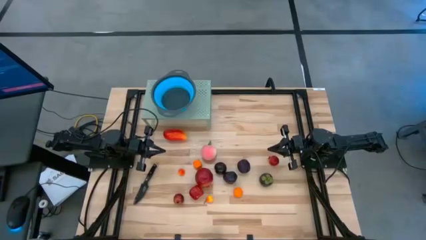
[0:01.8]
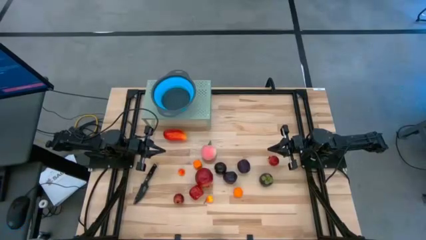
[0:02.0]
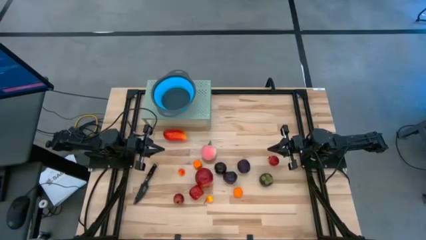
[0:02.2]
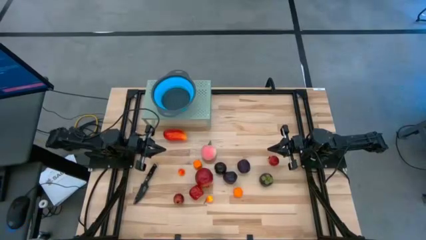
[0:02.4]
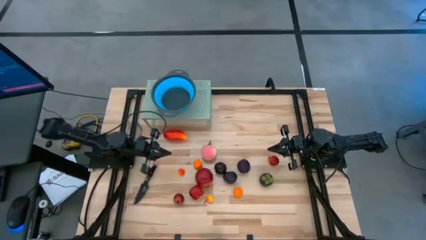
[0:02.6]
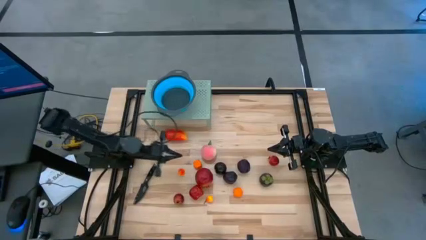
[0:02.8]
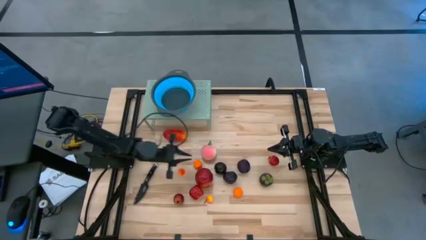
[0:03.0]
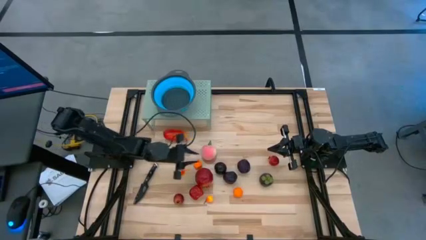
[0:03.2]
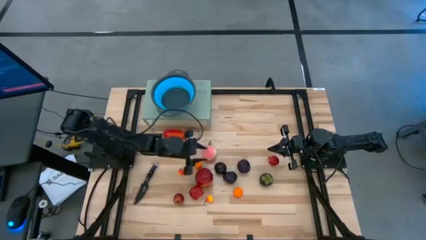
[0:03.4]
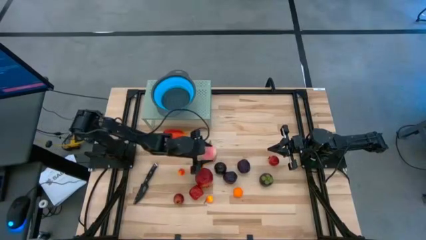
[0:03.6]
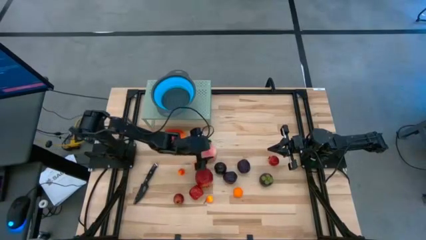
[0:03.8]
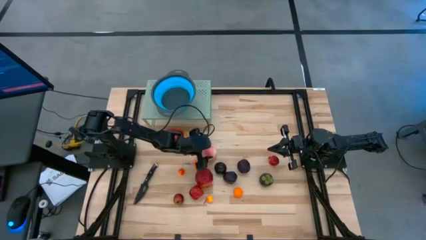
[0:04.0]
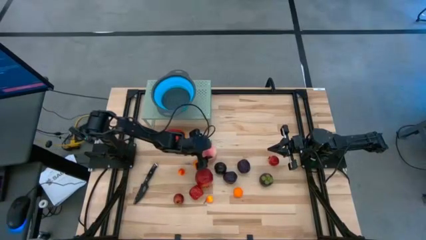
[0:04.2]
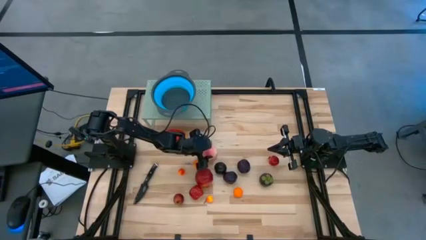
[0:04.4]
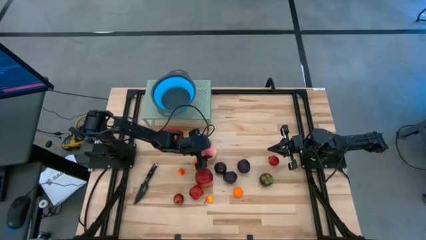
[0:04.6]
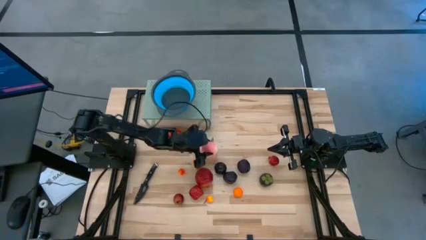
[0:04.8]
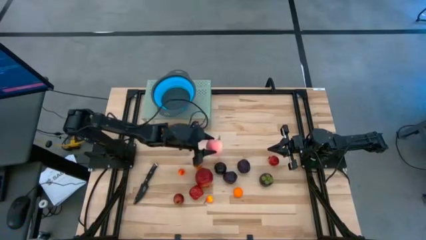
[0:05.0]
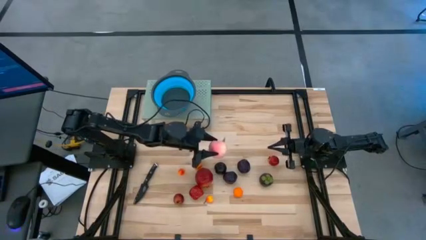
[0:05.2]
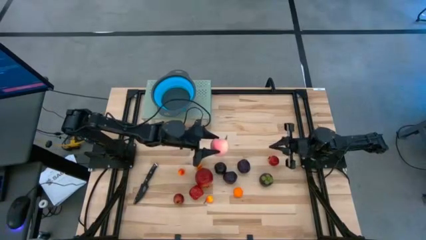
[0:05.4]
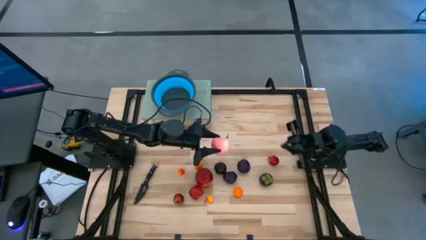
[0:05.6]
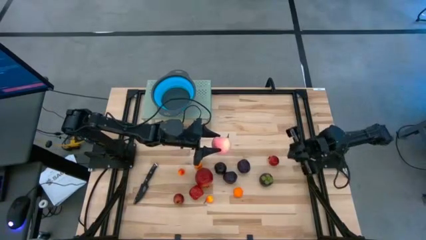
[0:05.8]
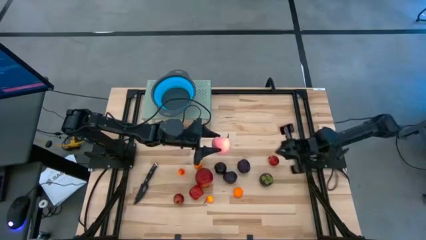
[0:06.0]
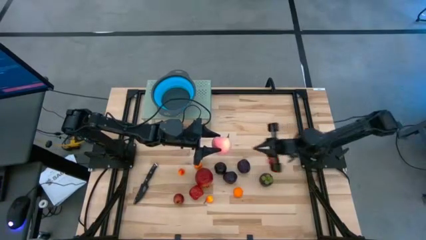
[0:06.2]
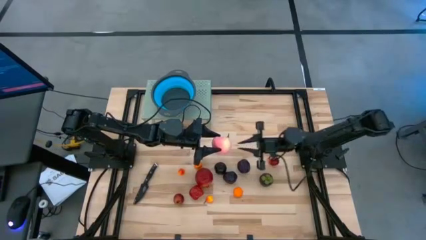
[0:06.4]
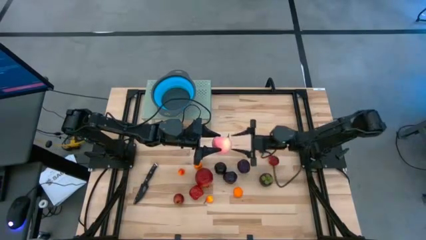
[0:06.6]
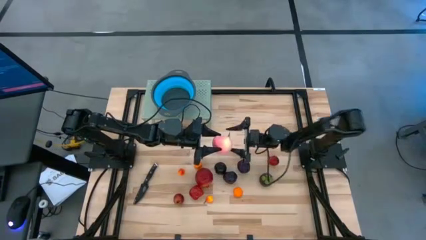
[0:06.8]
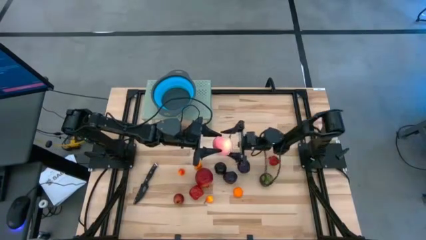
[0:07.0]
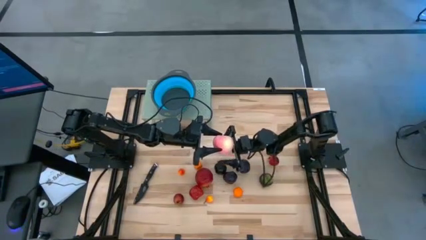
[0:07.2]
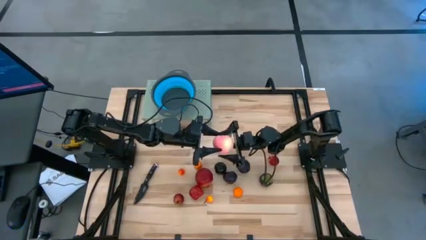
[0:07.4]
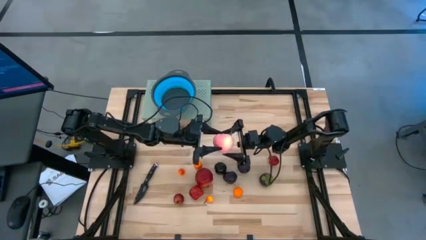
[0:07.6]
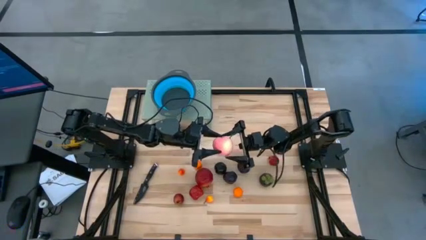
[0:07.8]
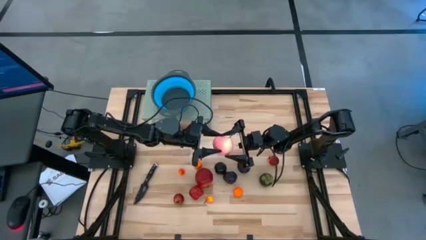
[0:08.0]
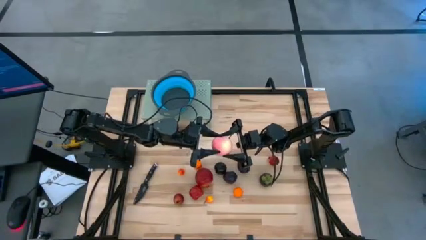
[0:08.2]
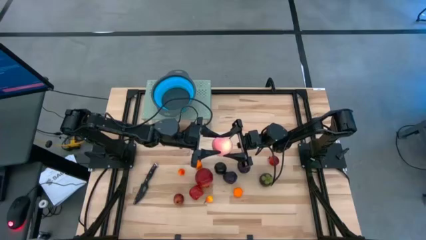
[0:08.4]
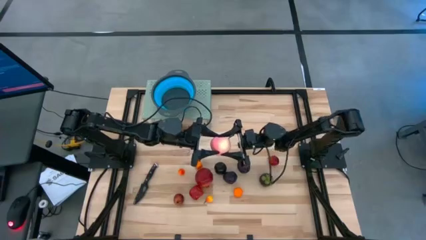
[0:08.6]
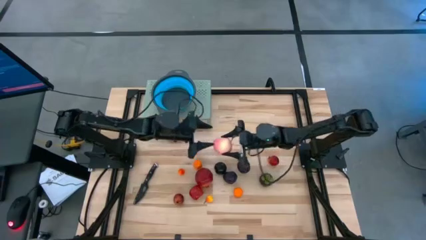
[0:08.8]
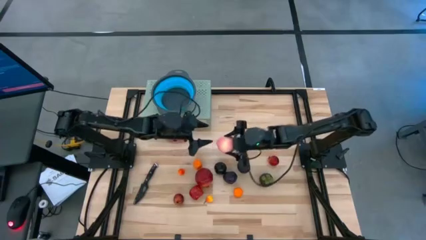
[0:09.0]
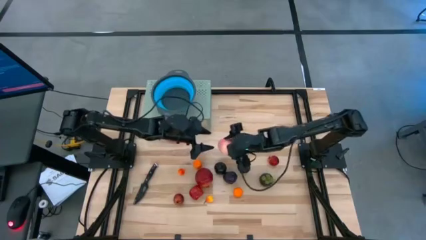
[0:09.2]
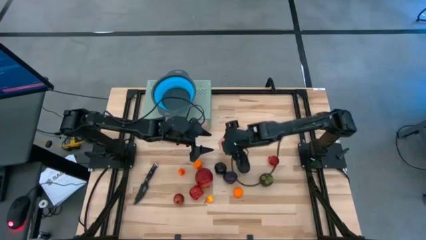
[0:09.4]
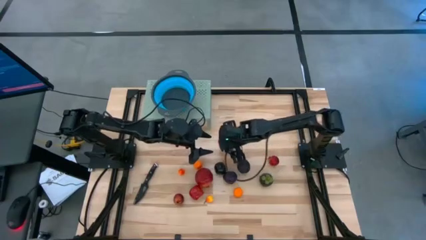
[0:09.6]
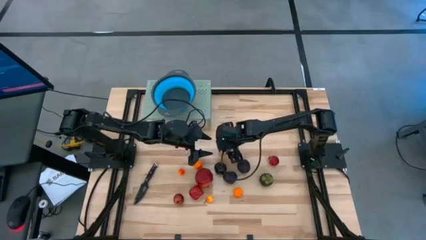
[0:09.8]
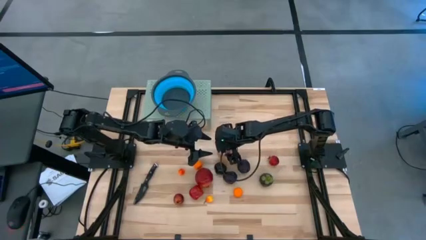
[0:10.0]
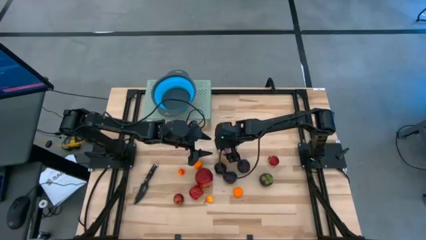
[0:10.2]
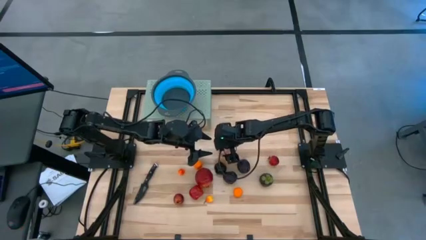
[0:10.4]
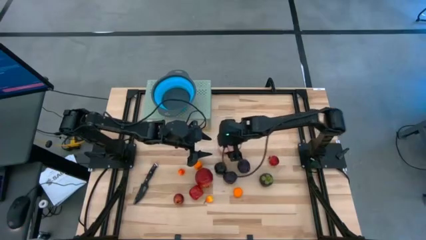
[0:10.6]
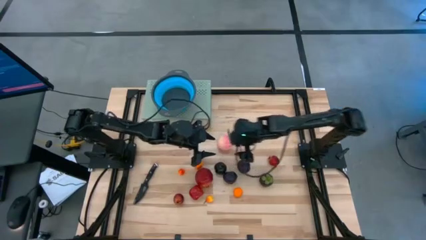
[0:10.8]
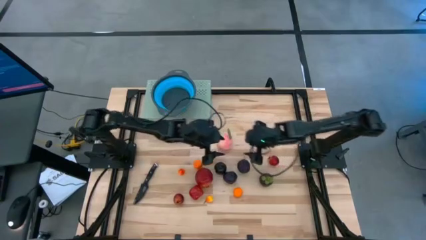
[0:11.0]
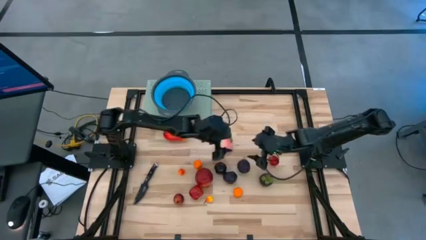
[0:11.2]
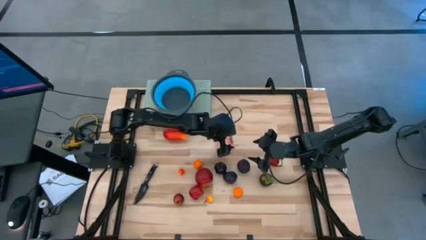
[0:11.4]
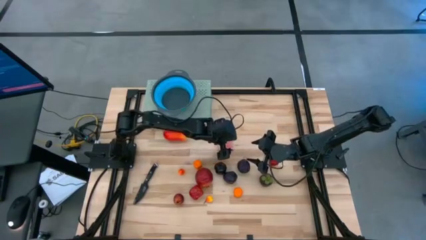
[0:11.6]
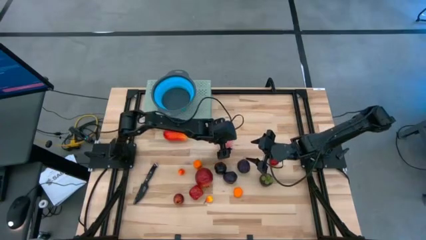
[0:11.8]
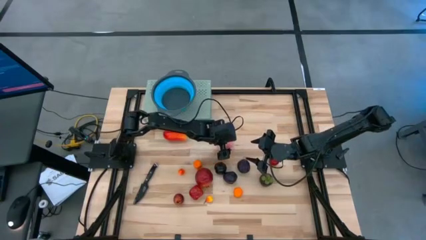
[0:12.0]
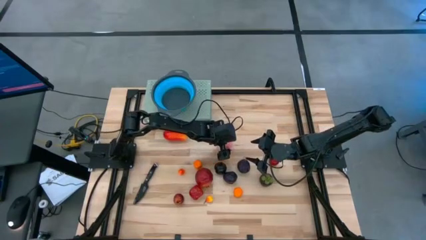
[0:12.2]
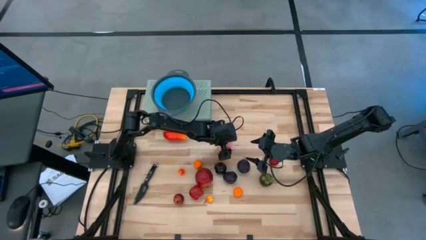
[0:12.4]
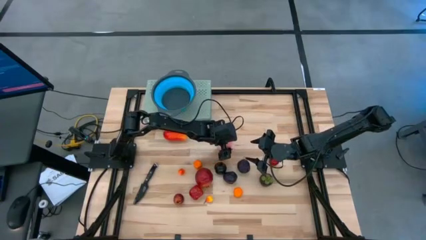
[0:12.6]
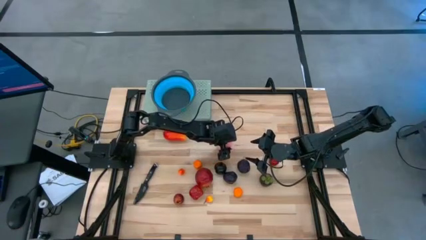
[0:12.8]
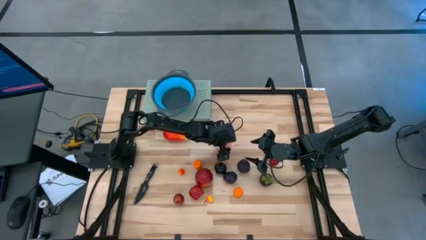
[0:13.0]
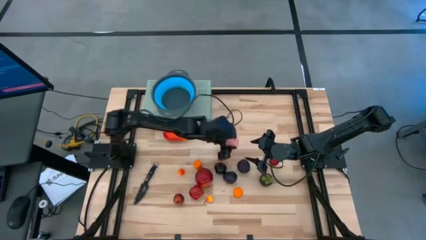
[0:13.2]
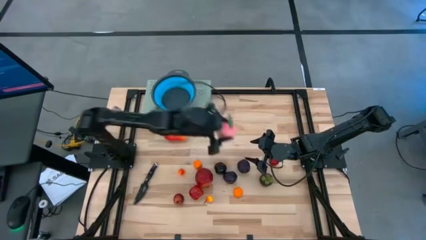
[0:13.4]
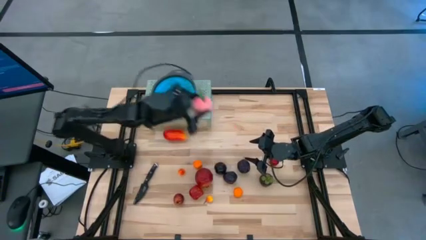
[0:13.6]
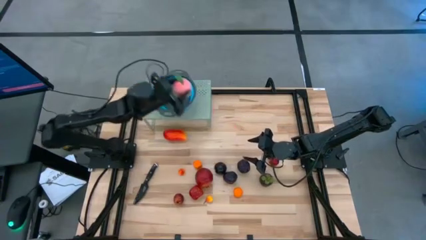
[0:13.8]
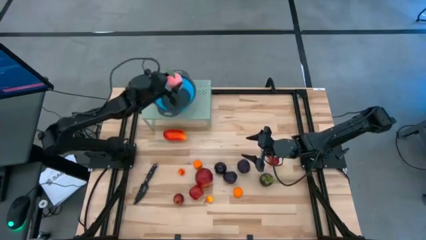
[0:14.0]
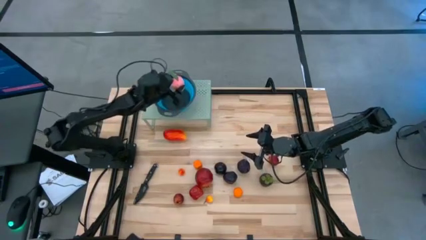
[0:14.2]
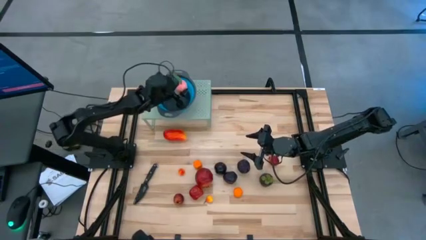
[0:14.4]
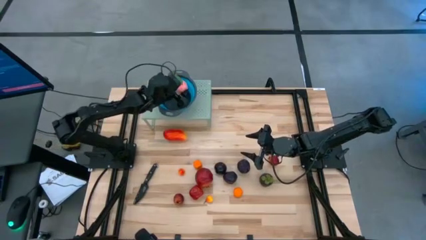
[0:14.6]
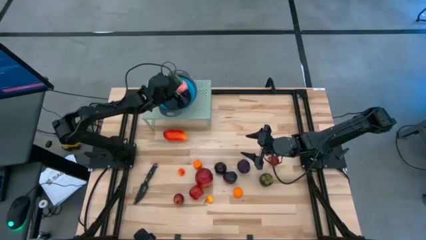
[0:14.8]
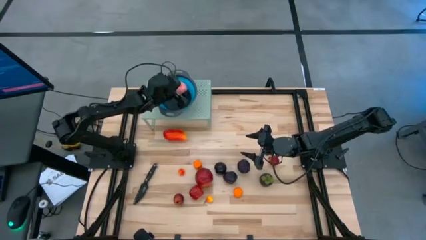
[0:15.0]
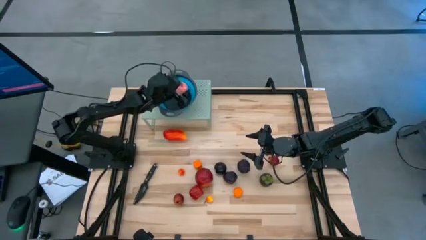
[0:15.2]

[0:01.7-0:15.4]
Task: Pick & Place Fruit
Put the pink peach into the blue strainer bowl on the shelf

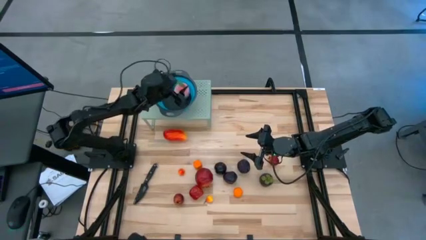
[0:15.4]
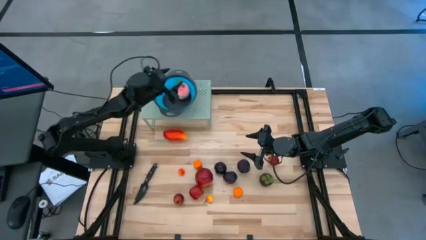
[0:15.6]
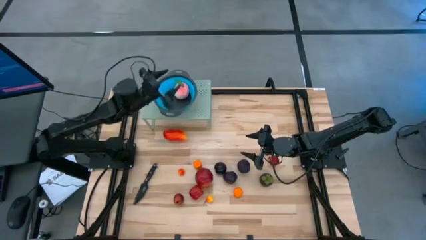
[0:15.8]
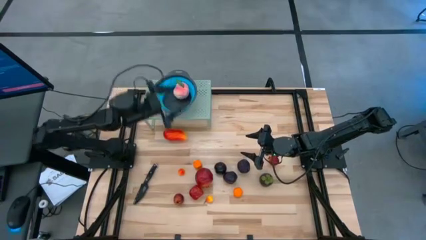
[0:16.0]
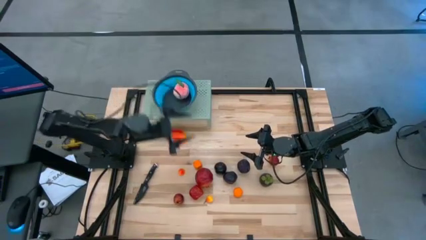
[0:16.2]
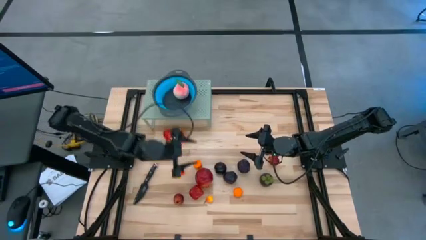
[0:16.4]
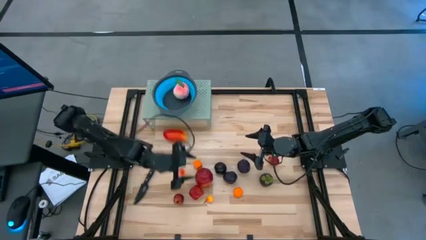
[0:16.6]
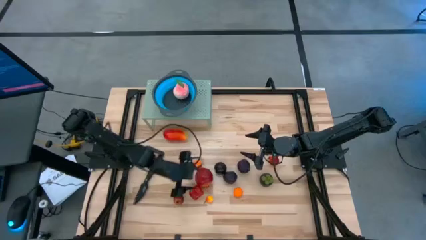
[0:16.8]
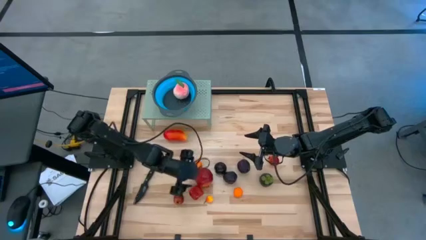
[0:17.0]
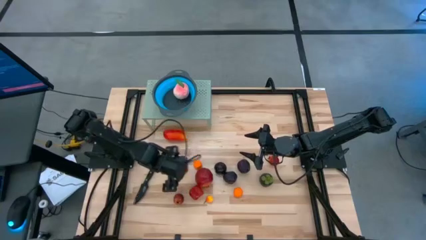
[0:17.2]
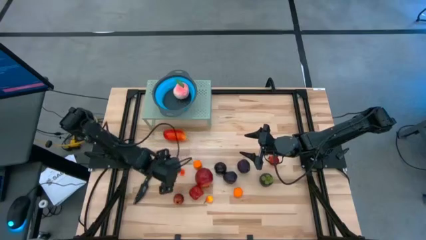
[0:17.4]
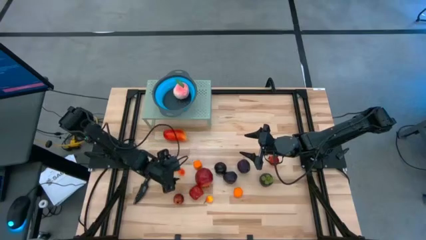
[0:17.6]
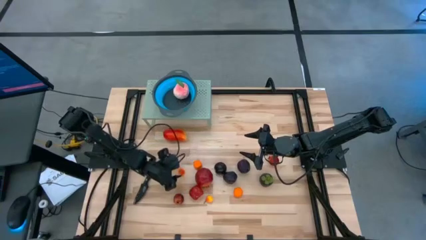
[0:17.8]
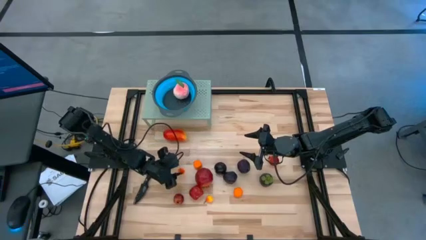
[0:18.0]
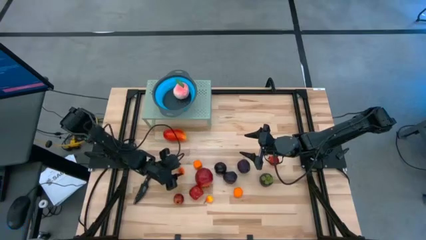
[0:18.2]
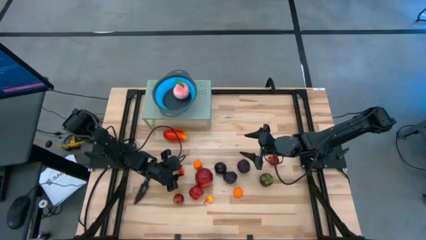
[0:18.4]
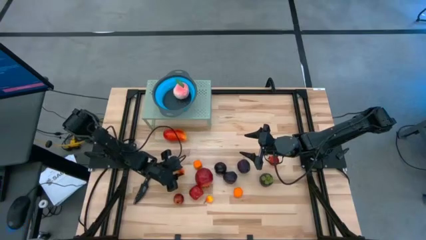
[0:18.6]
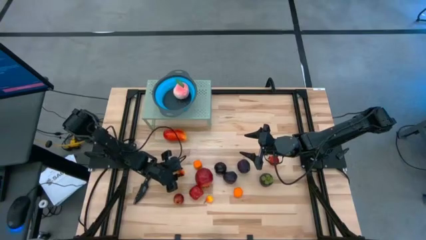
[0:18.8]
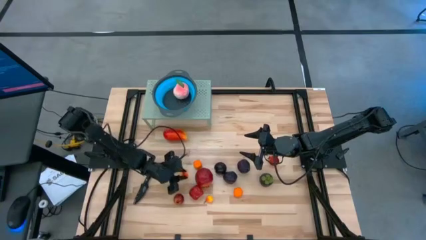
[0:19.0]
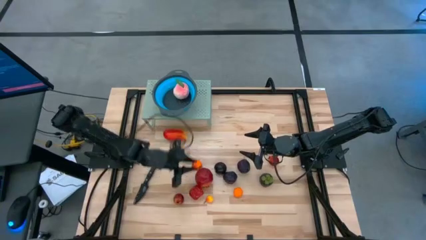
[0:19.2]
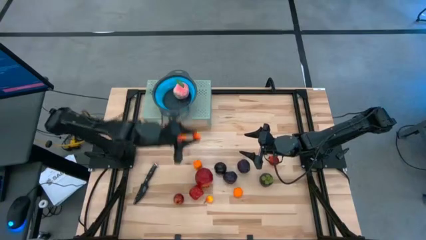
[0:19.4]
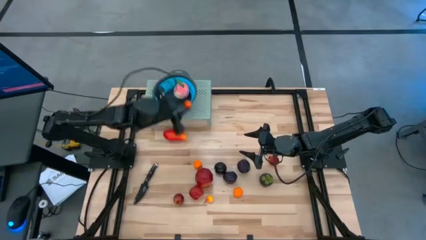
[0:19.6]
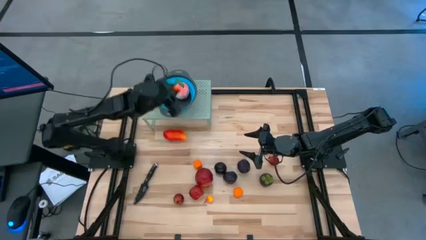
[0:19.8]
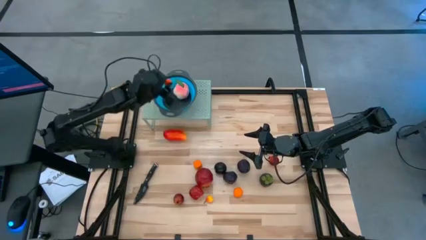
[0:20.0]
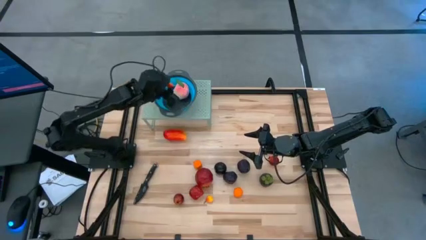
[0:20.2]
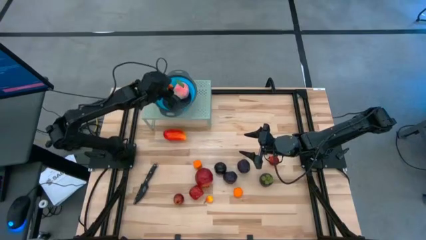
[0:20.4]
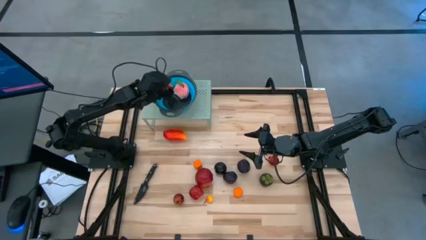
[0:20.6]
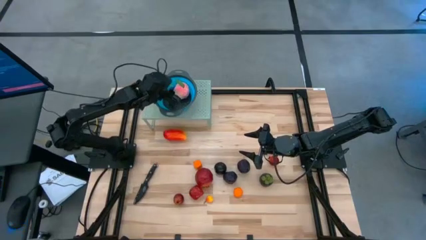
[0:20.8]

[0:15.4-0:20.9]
Put the top orange peach into the blue strainer bowl on the shelf
